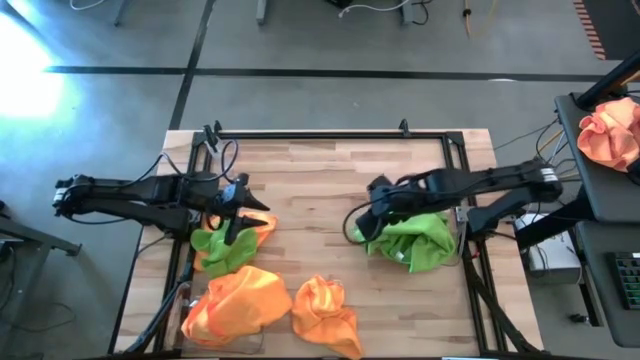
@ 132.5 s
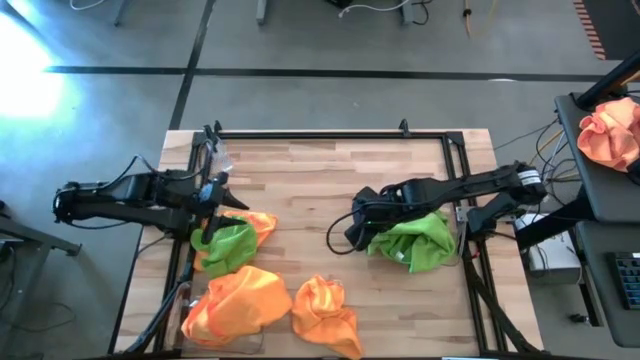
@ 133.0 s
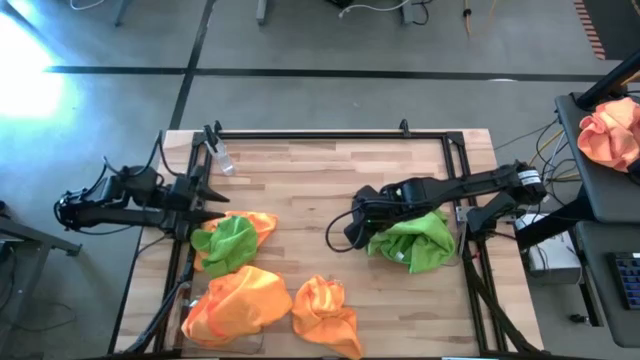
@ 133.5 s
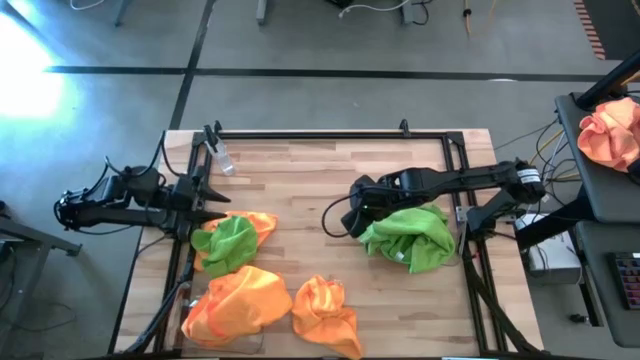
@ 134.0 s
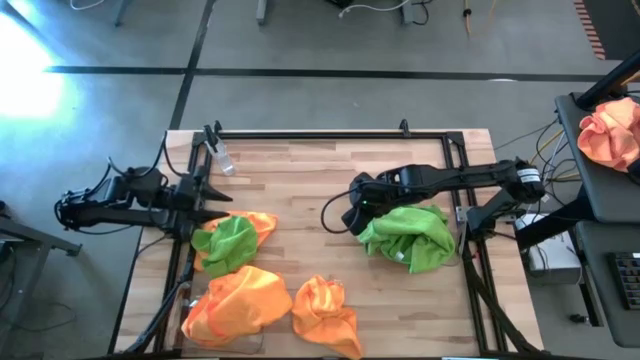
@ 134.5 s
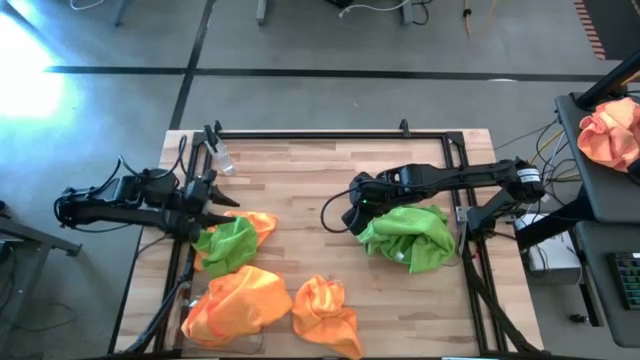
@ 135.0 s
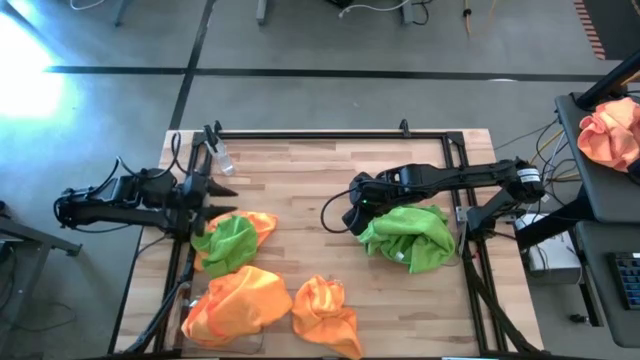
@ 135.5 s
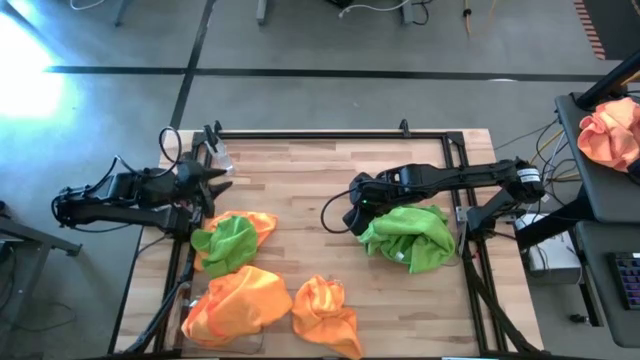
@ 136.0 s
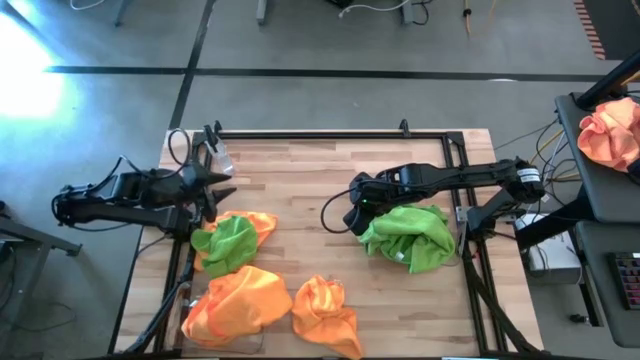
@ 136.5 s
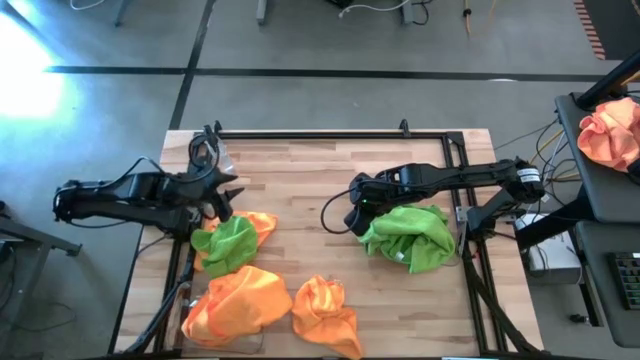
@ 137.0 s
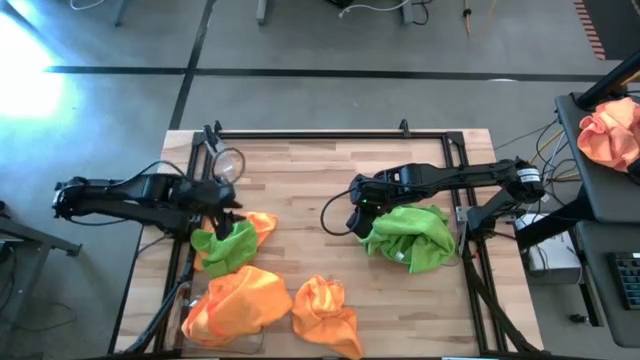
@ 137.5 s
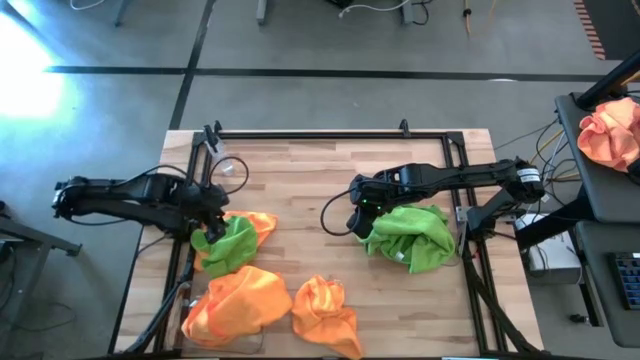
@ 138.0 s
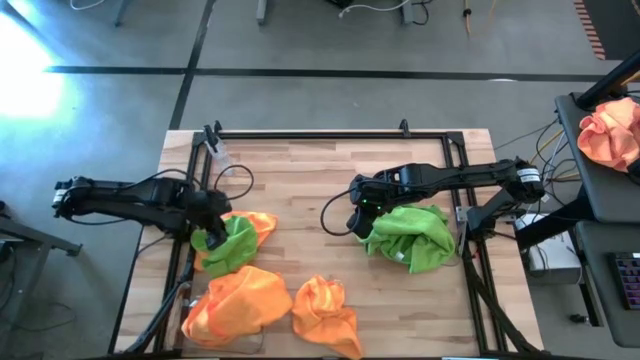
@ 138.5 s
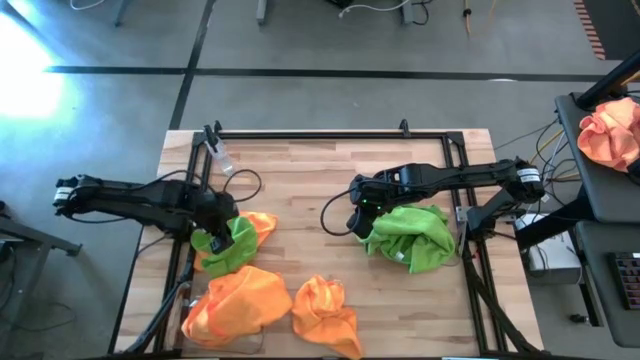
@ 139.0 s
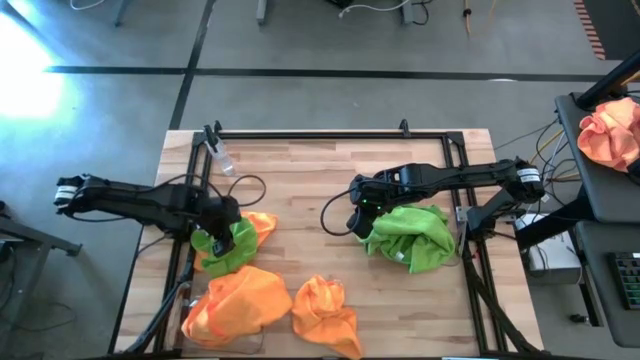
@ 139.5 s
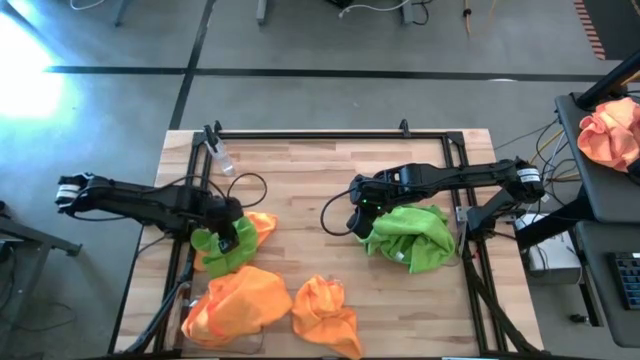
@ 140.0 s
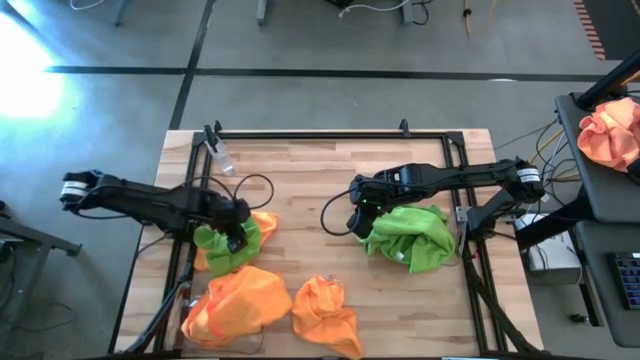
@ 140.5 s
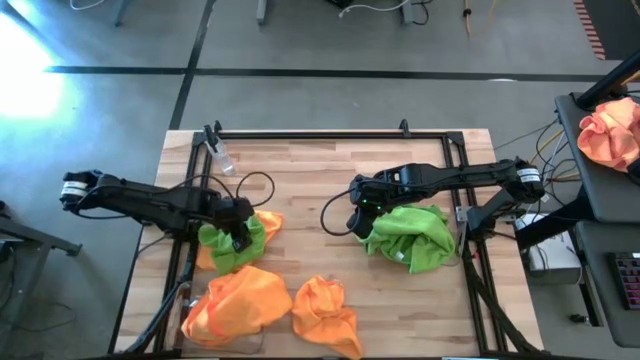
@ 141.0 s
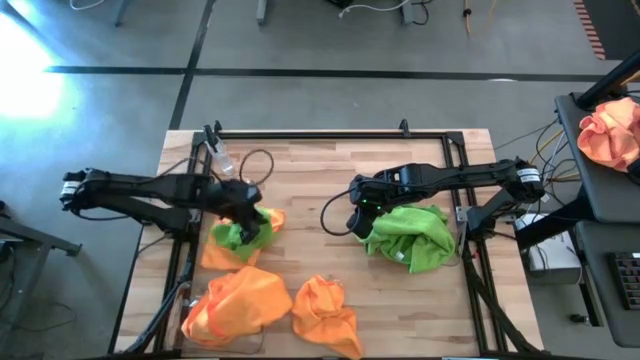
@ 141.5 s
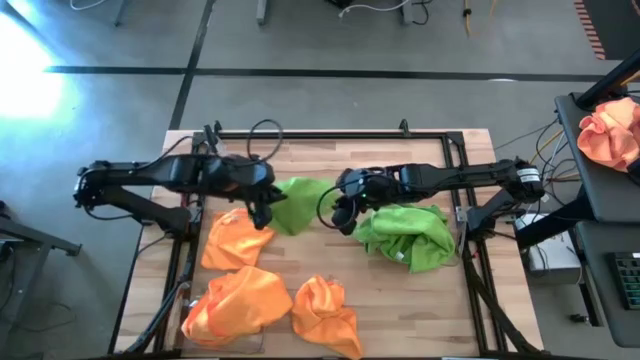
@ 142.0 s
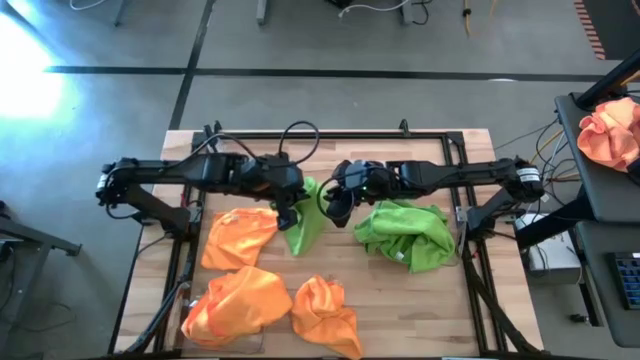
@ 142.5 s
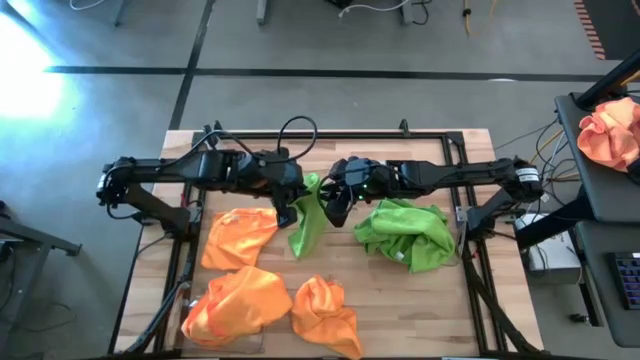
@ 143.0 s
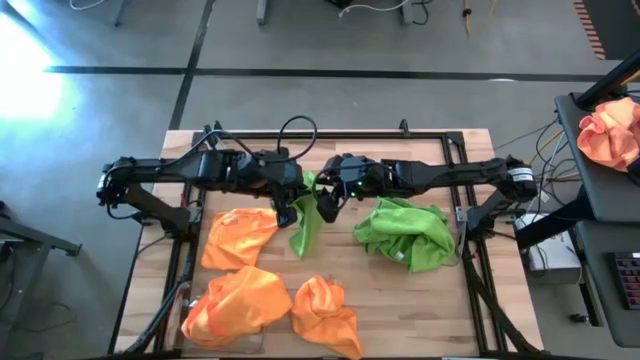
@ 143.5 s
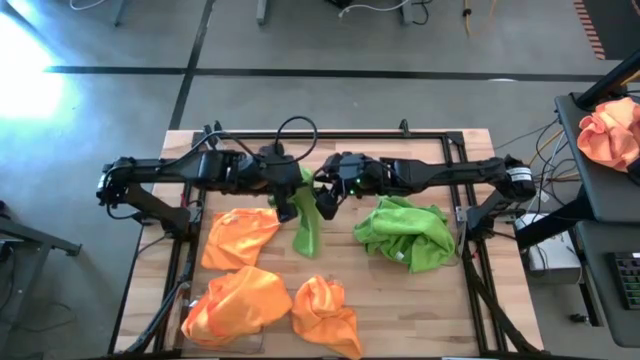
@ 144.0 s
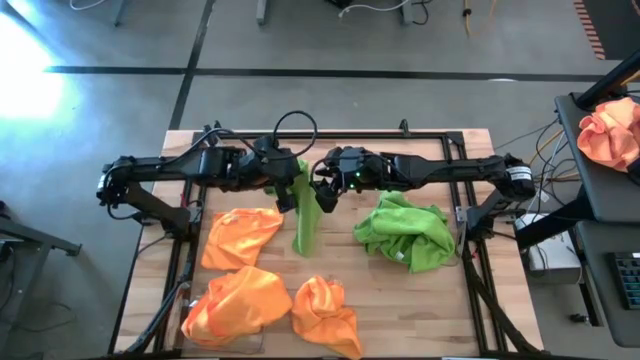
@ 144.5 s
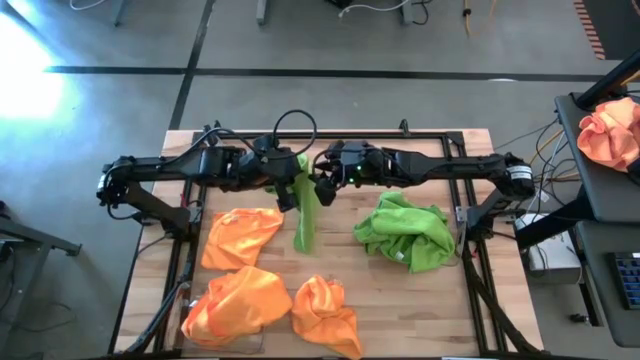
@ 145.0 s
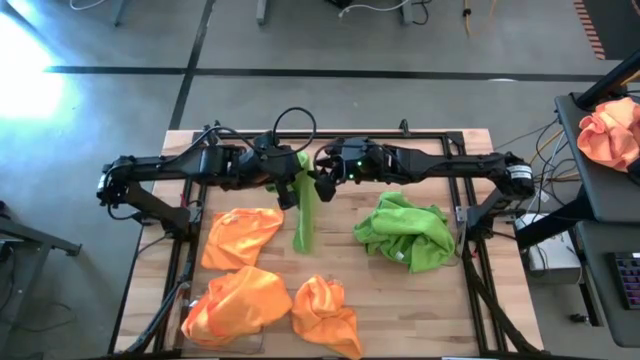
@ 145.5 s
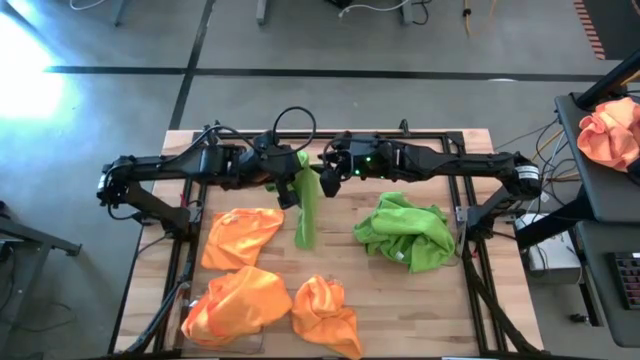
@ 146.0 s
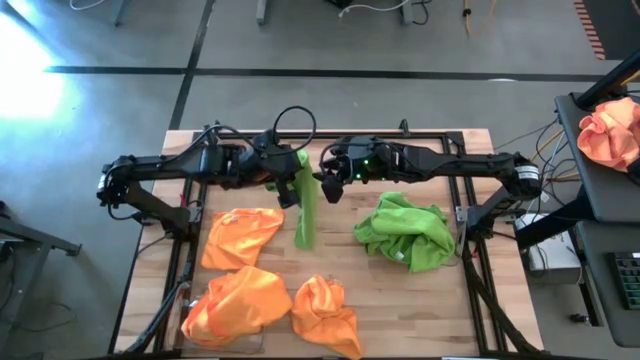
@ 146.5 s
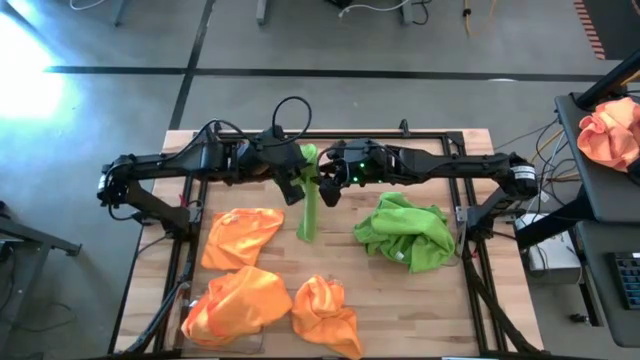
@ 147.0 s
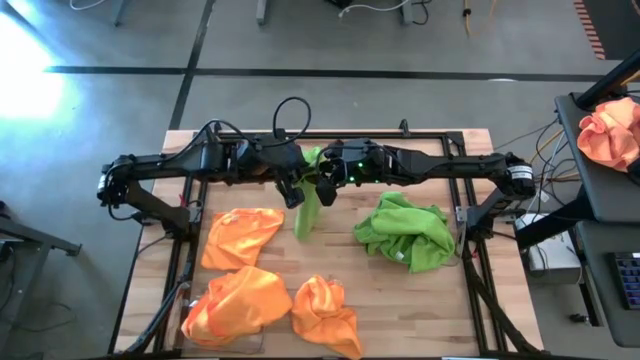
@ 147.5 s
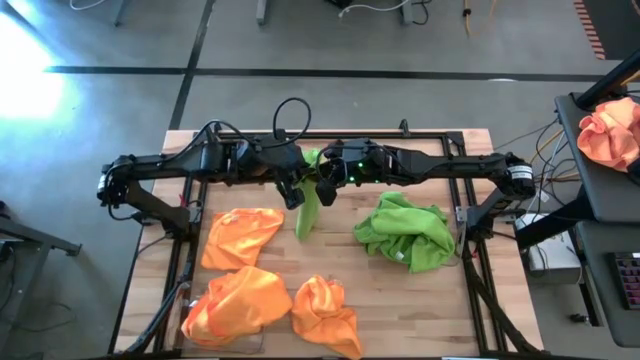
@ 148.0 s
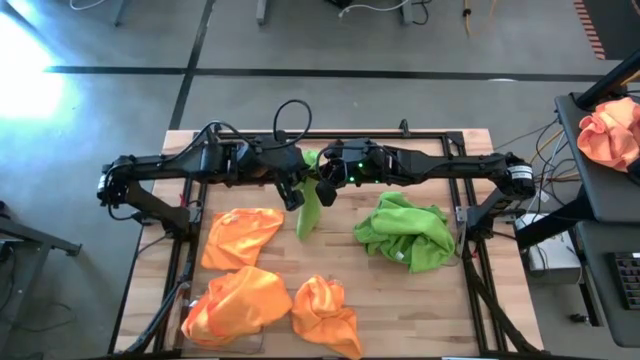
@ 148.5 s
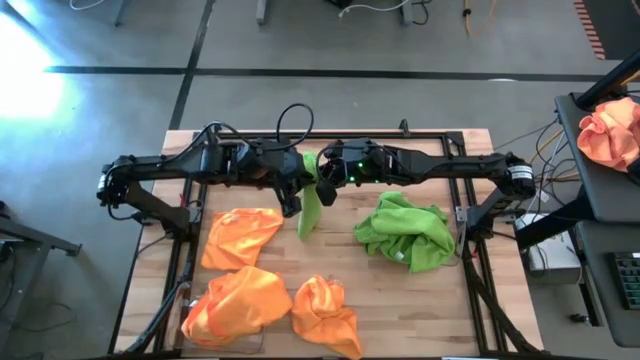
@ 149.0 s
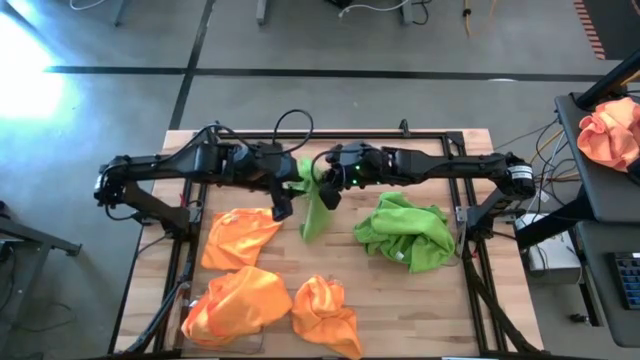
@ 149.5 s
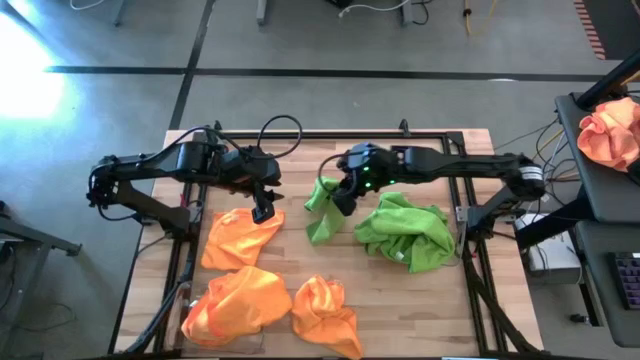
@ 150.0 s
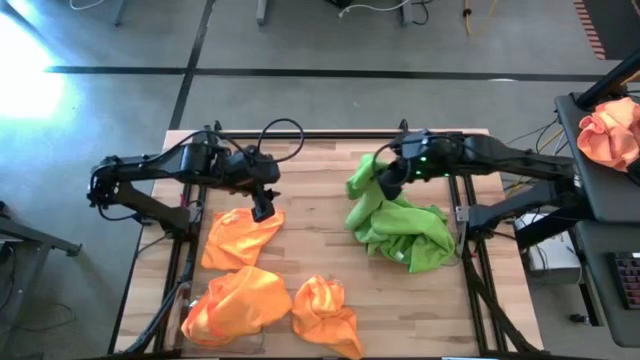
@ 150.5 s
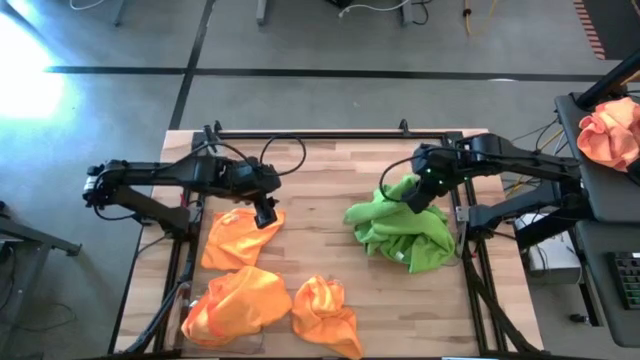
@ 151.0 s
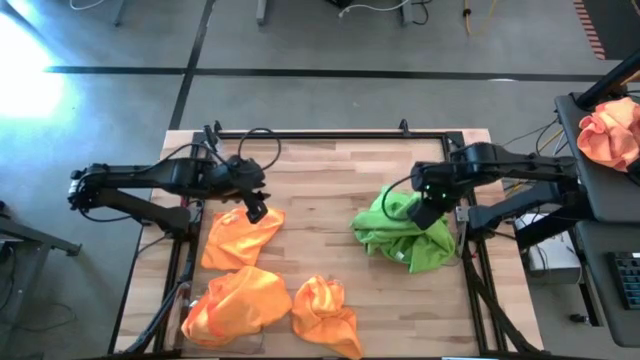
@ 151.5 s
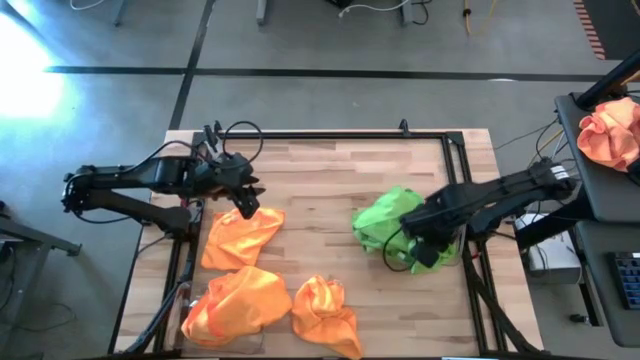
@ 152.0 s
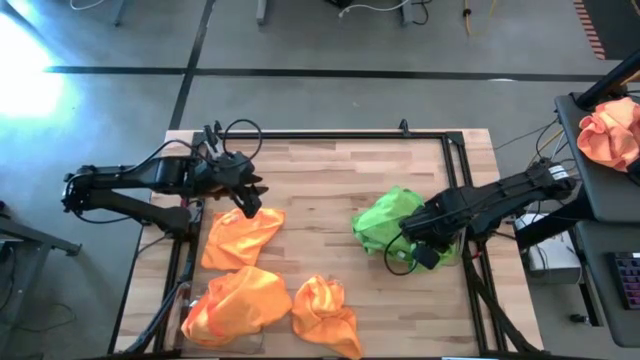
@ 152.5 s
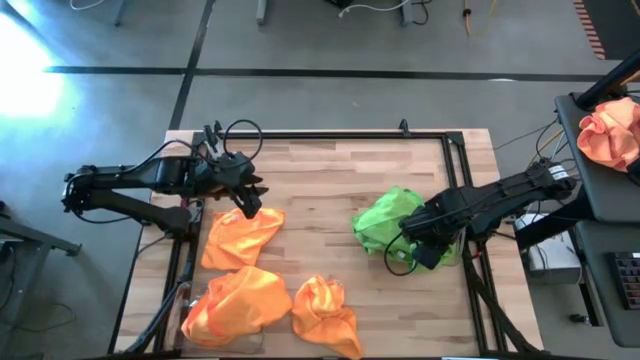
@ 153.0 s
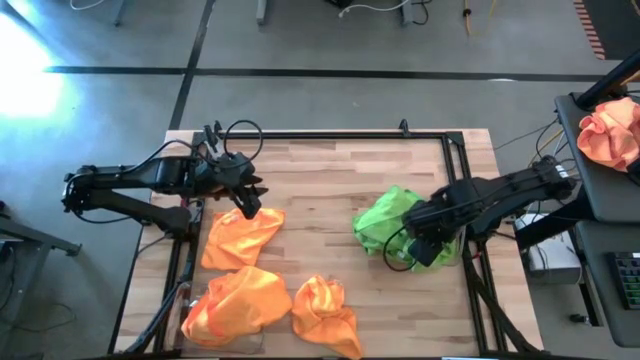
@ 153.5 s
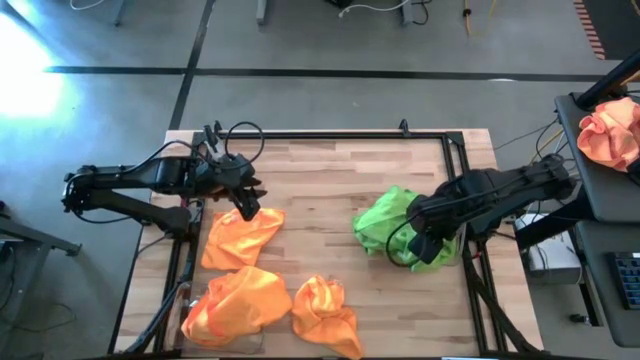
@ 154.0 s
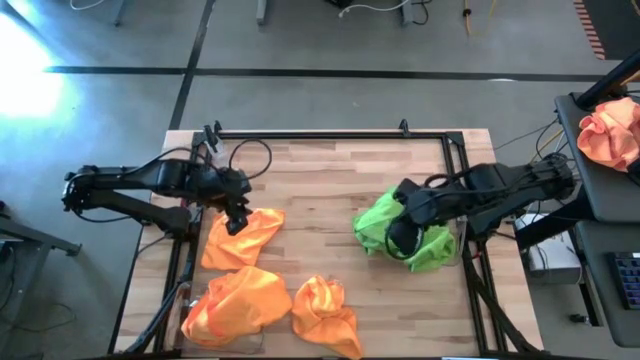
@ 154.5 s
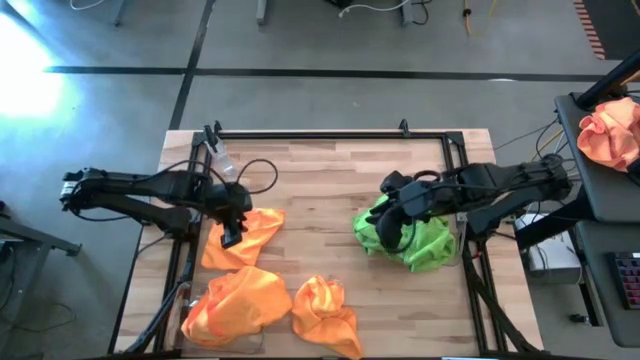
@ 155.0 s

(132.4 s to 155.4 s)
Task: Sort microfiber towel by color & place in baskets
Put the green towel into the right transparent bin
